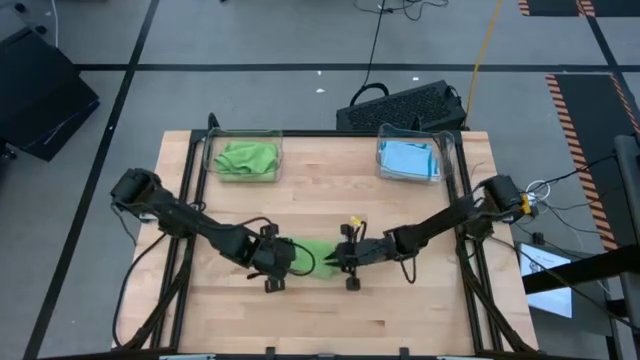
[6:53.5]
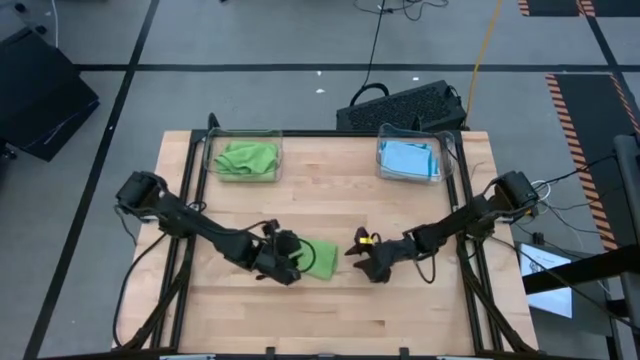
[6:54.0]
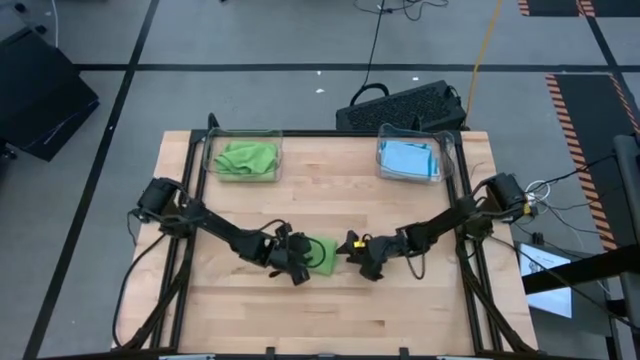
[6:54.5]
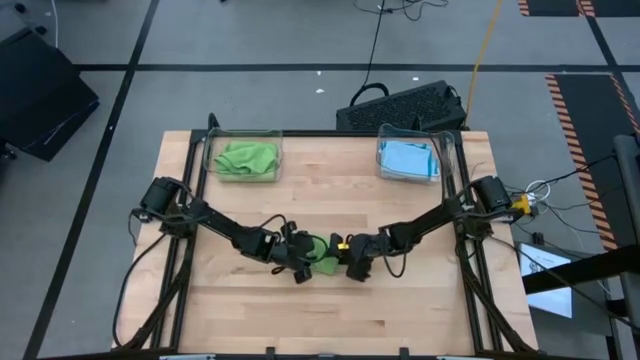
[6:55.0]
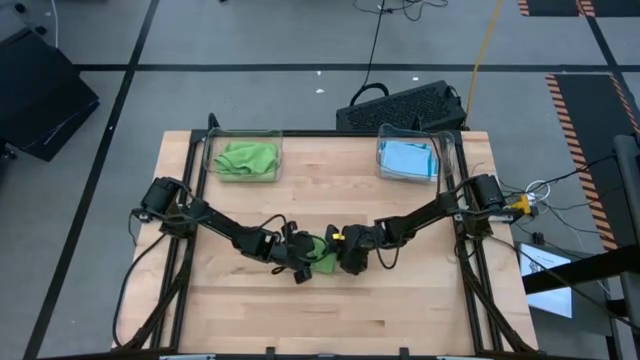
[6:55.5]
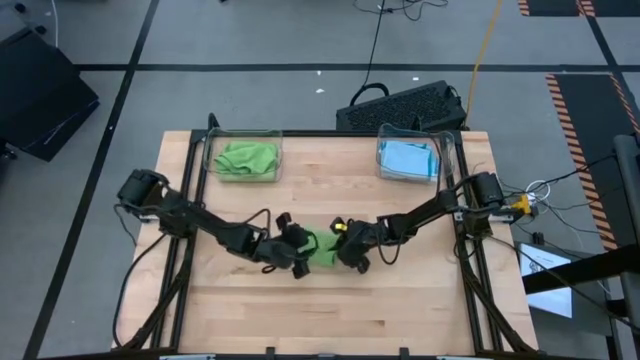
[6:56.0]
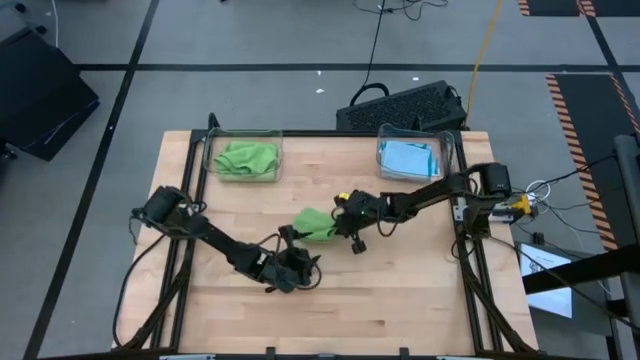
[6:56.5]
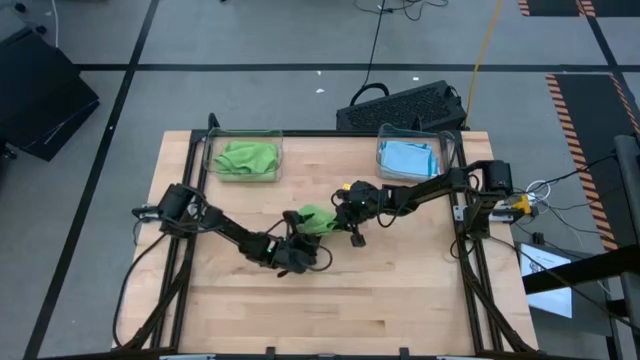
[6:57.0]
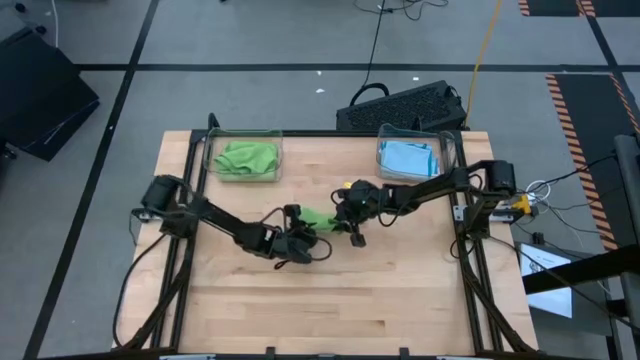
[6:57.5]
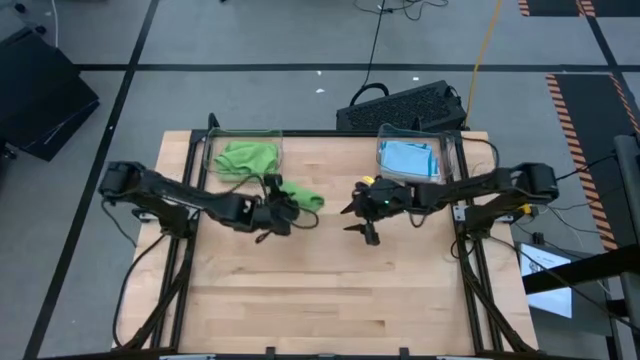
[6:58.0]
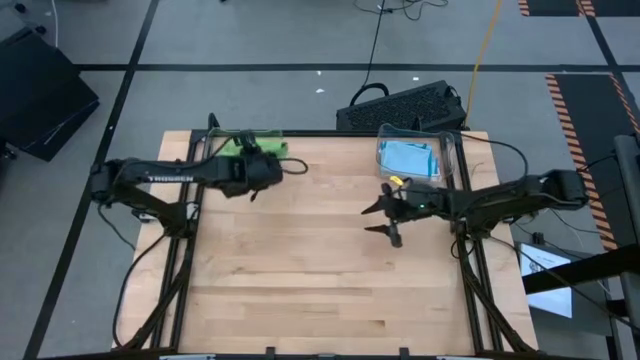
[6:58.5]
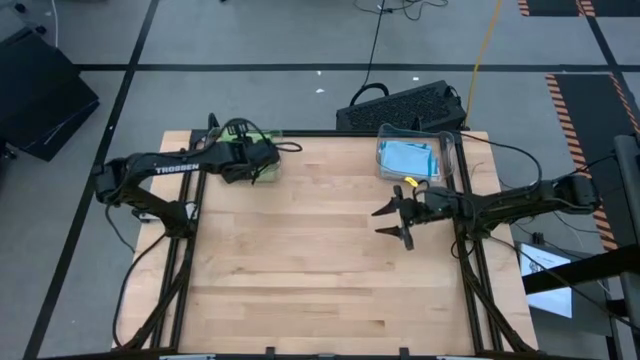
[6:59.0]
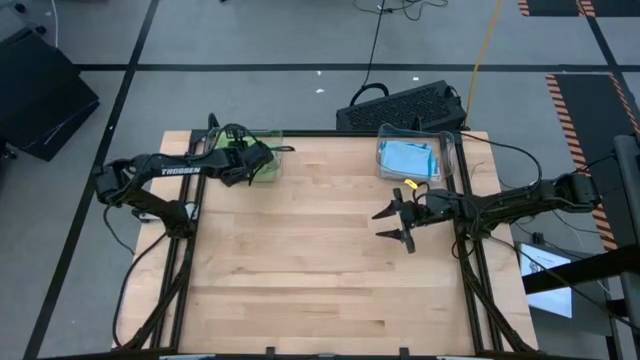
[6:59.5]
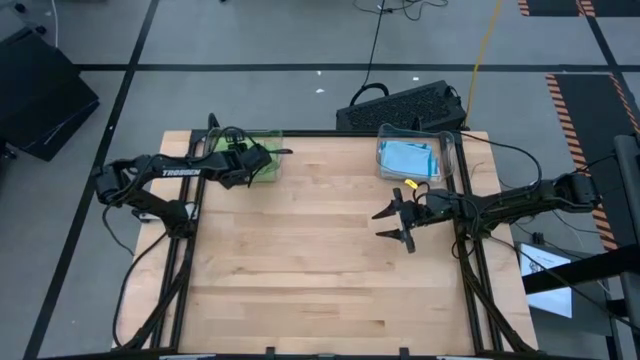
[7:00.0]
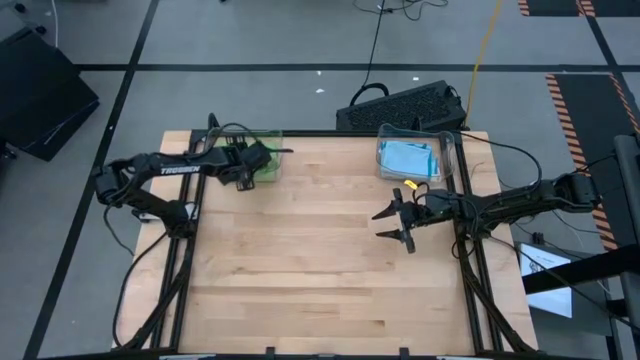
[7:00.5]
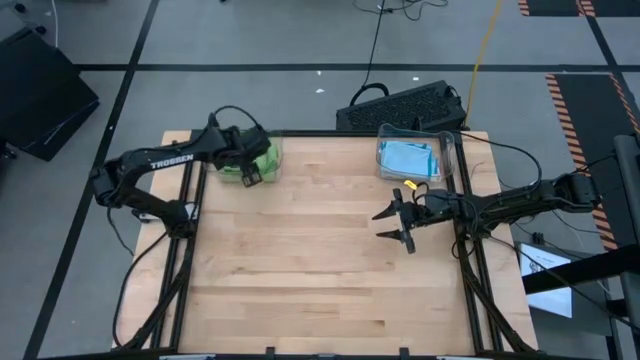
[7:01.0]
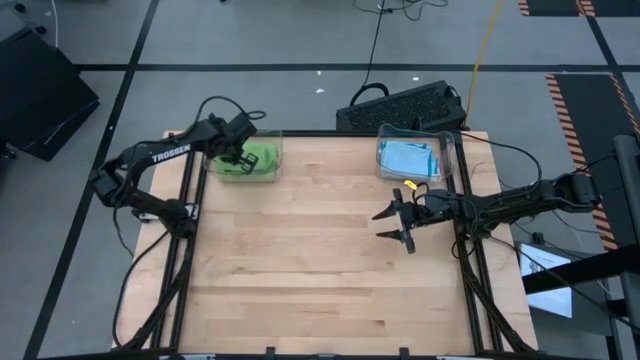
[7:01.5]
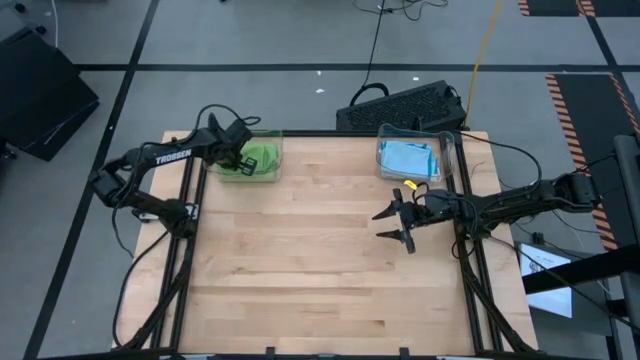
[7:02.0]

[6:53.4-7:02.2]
Task: Fold microfiber towels
Put the folded green microfiber cloth into the left transparent bin

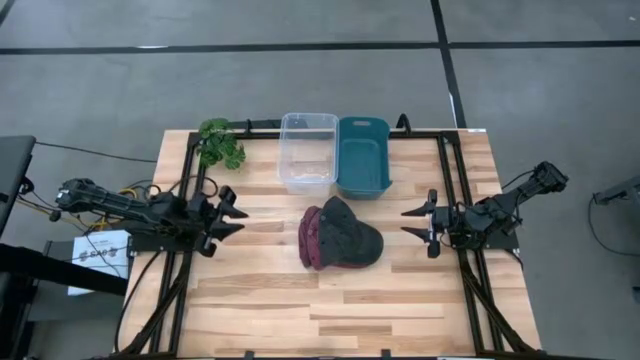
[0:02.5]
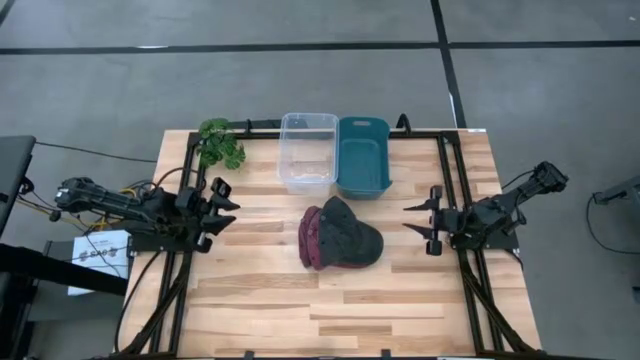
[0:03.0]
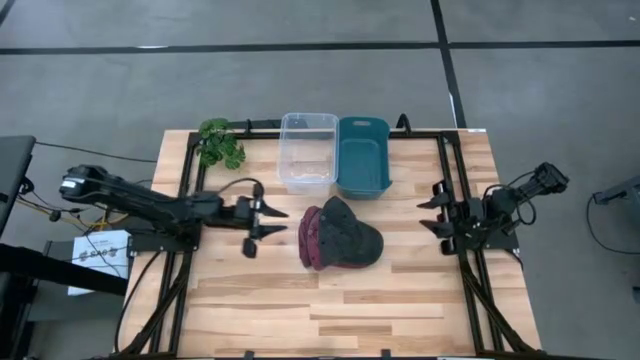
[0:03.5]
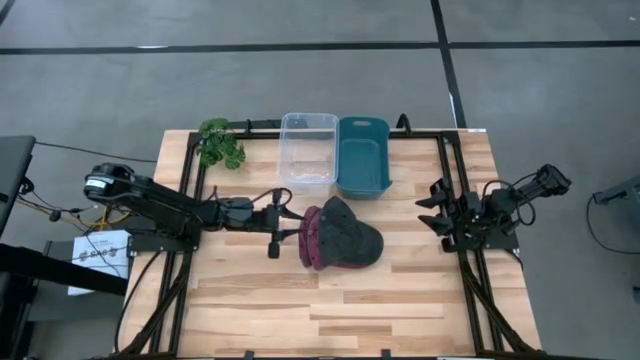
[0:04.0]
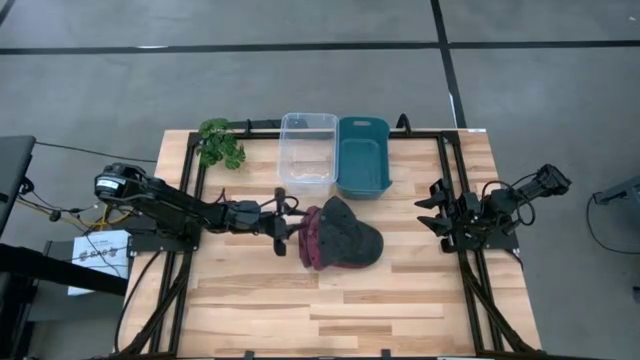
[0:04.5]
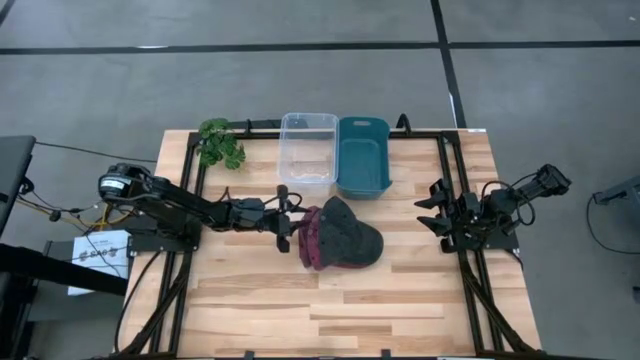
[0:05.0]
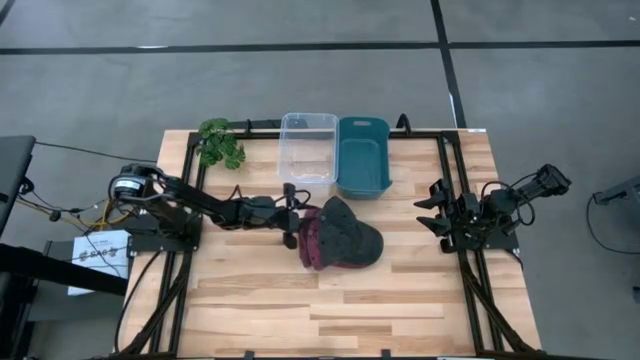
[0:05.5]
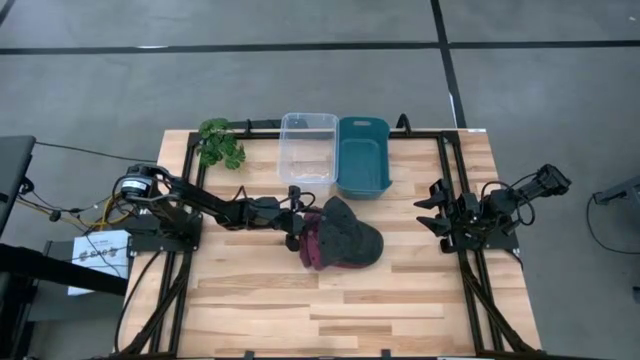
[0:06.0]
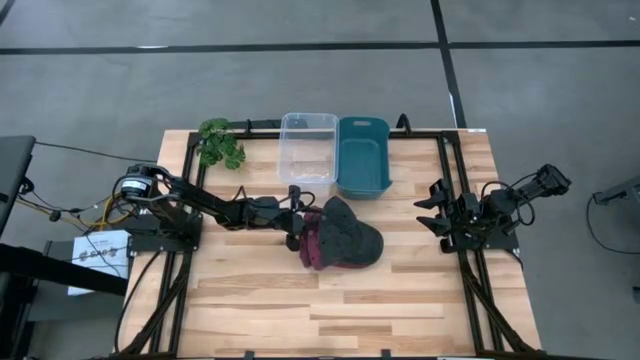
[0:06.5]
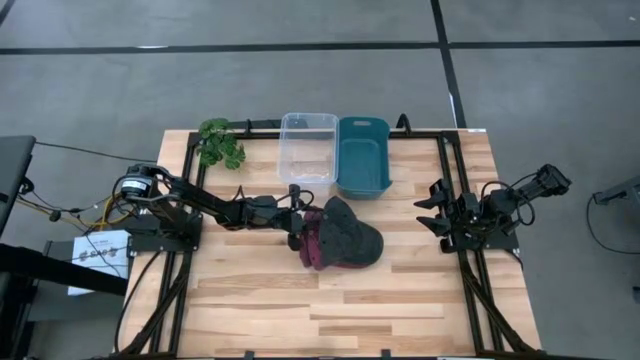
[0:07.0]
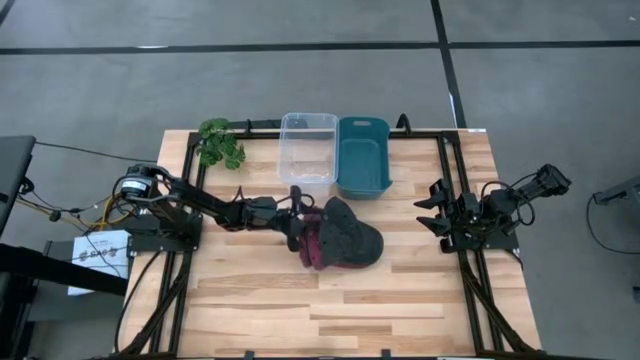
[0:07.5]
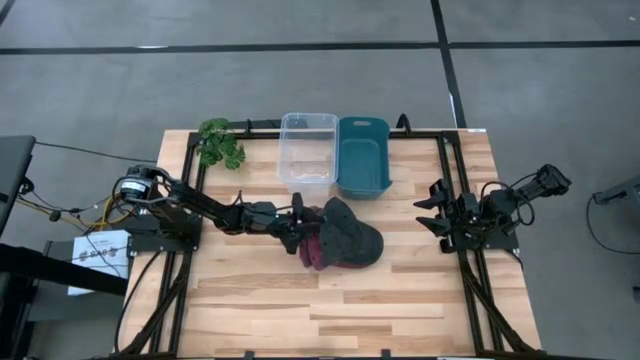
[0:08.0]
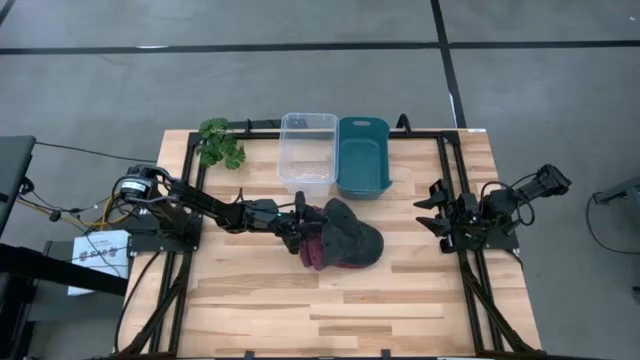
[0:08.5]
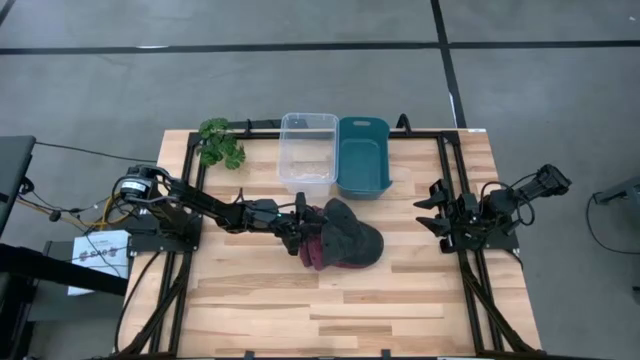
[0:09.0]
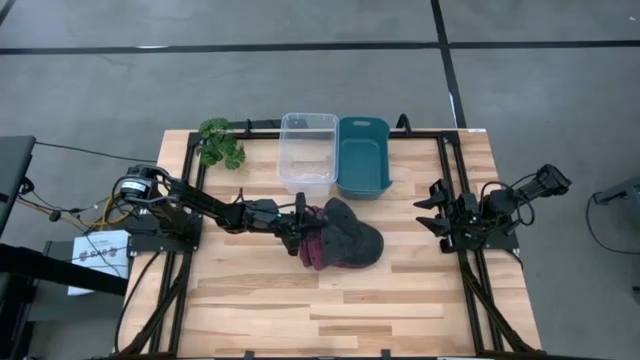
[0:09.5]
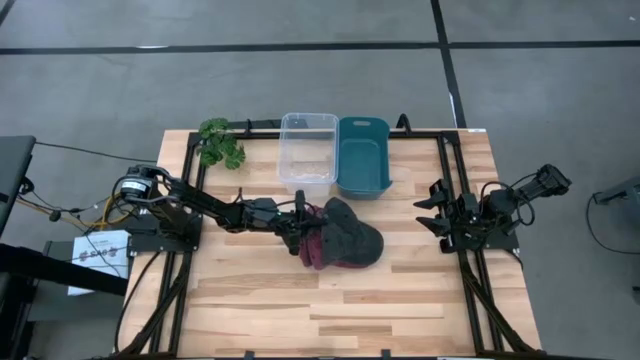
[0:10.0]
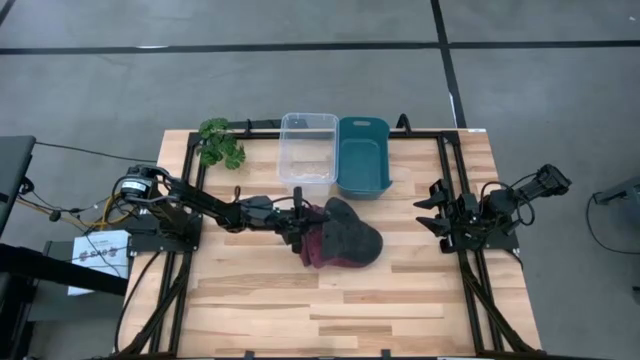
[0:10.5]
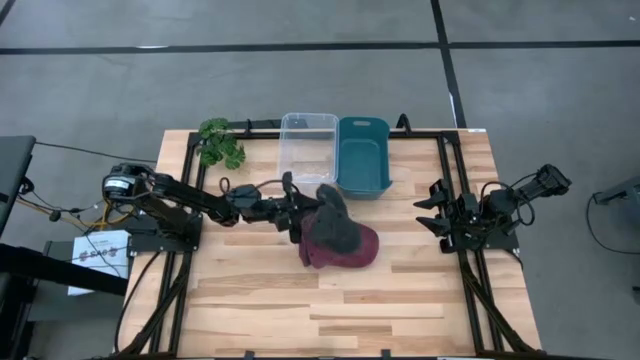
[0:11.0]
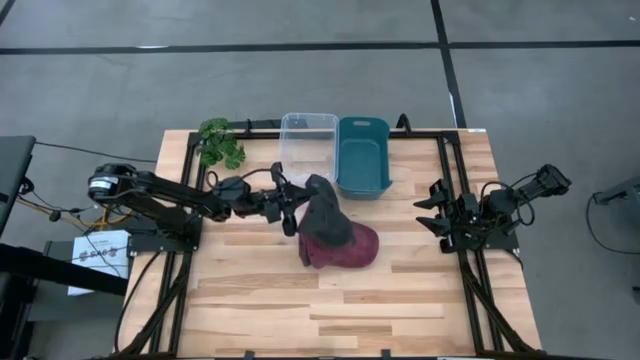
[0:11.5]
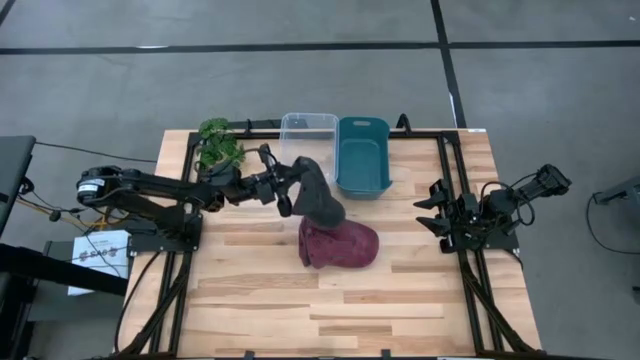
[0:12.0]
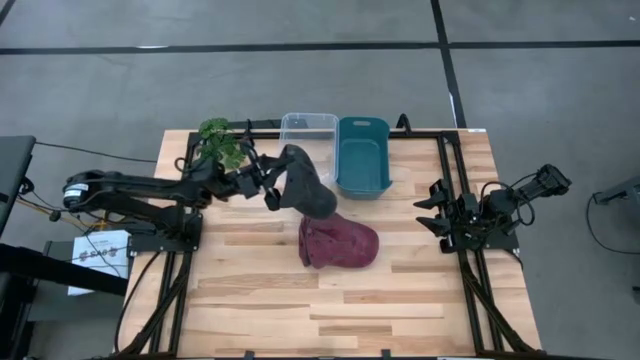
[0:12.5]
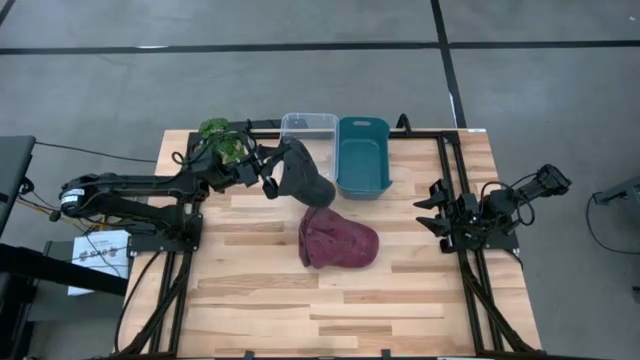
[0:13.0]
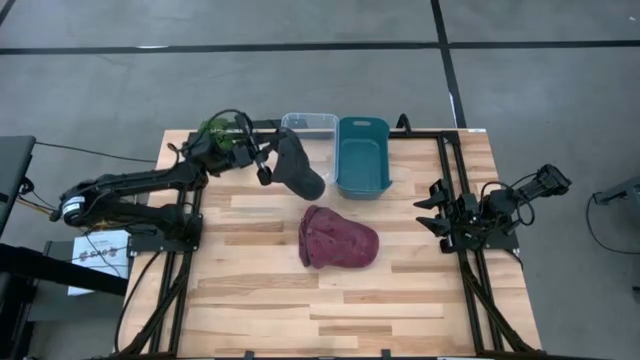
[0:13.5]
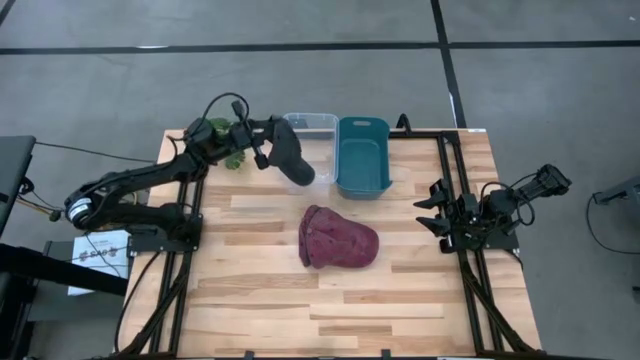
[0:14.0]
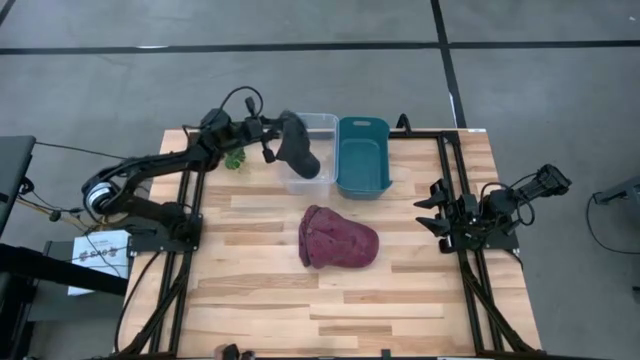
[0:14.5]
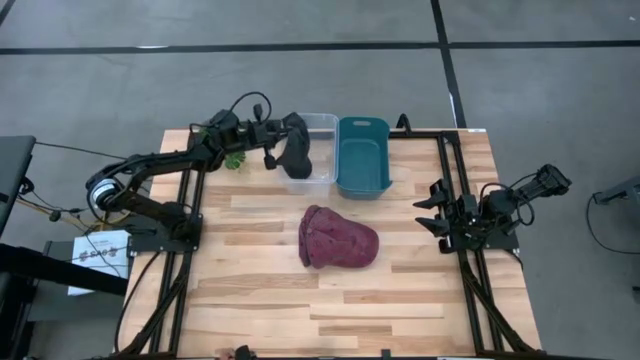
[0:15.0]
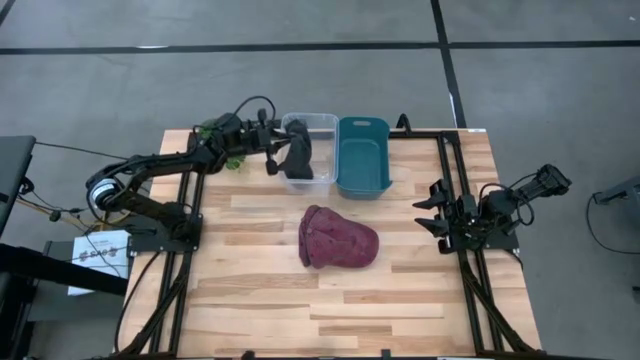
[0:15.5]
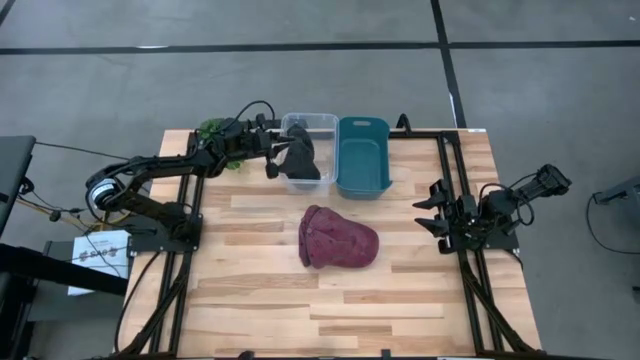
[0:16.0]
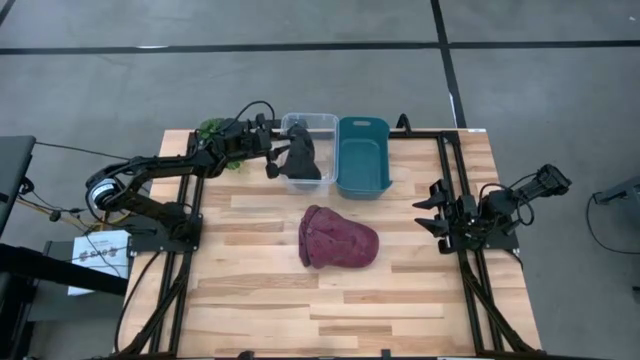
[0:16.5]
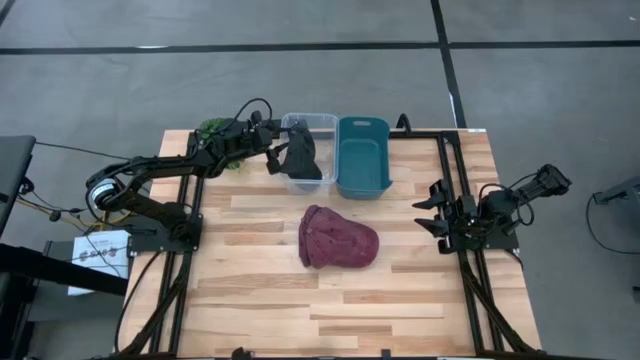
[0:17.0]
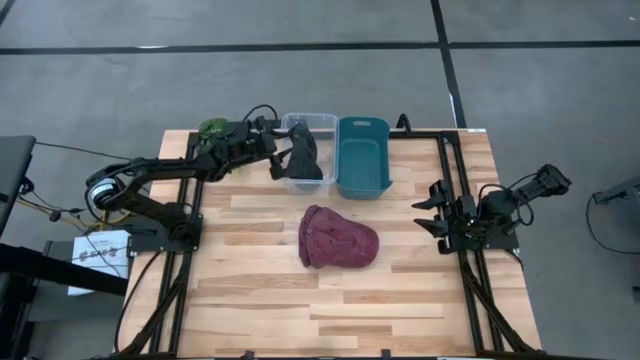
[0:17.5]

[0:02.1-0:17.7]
Task: Pick & Place hat
Put the black cap into the transparent bin
